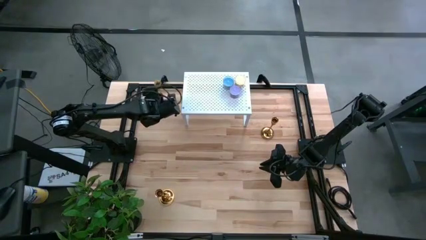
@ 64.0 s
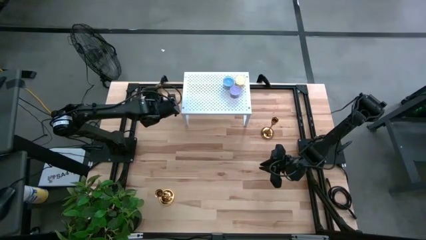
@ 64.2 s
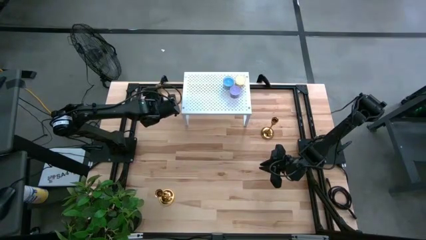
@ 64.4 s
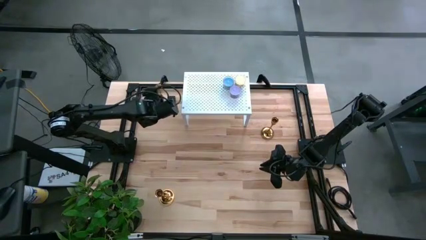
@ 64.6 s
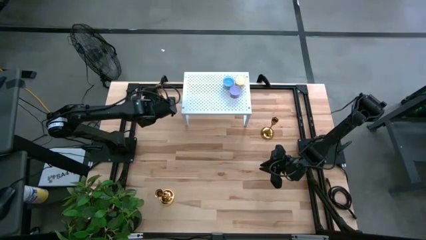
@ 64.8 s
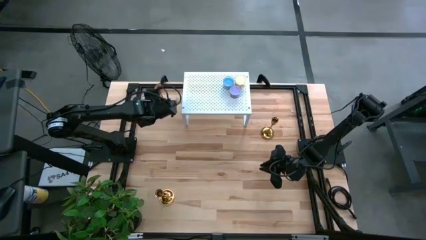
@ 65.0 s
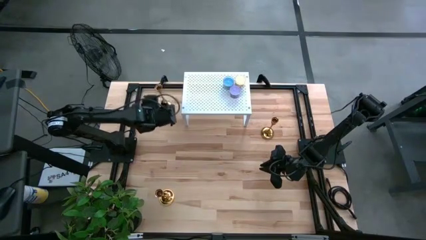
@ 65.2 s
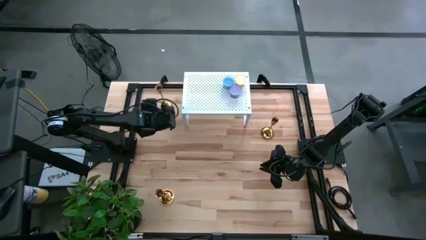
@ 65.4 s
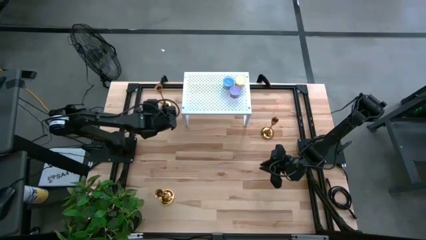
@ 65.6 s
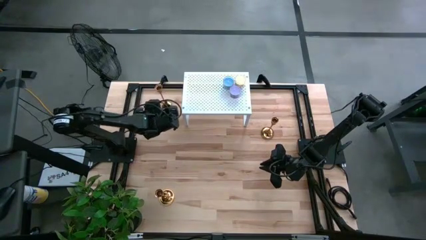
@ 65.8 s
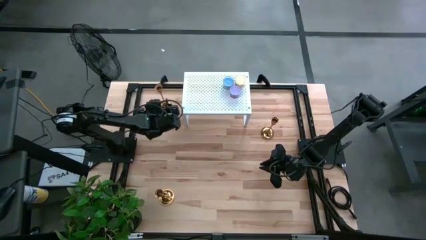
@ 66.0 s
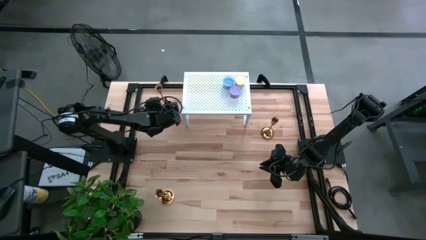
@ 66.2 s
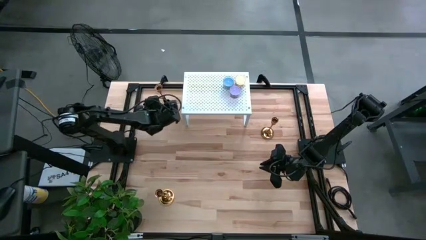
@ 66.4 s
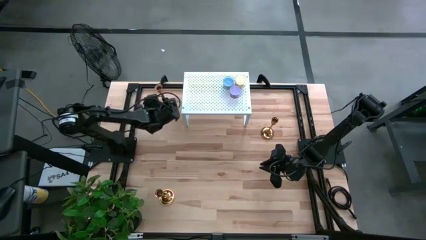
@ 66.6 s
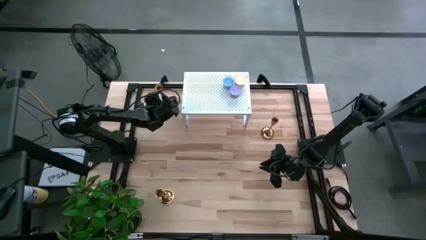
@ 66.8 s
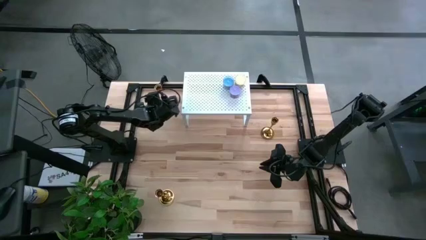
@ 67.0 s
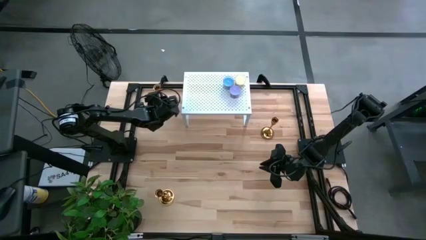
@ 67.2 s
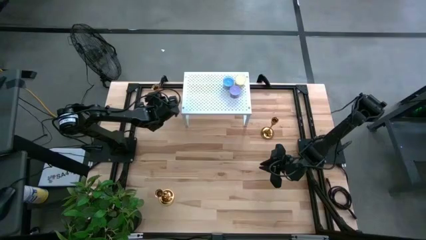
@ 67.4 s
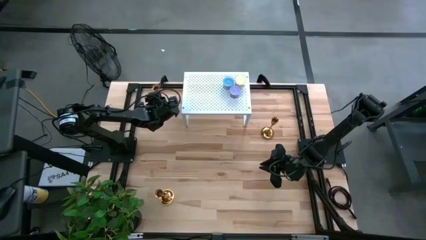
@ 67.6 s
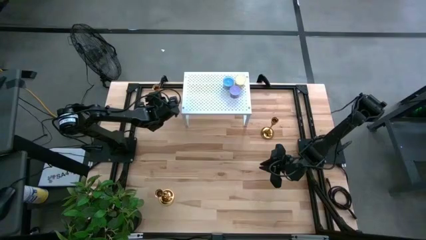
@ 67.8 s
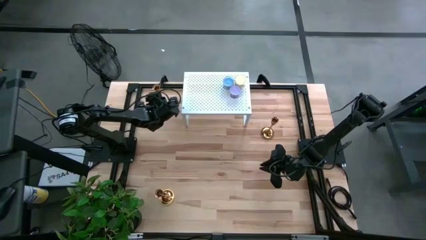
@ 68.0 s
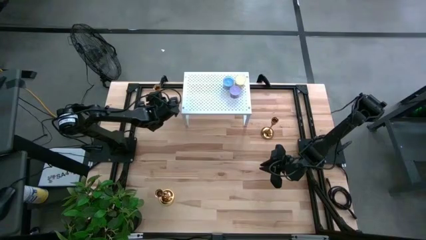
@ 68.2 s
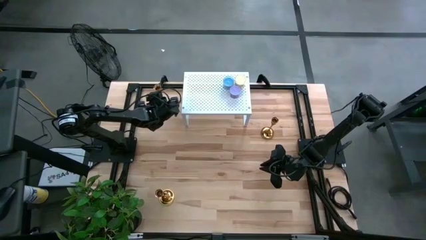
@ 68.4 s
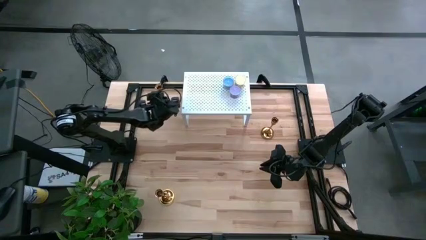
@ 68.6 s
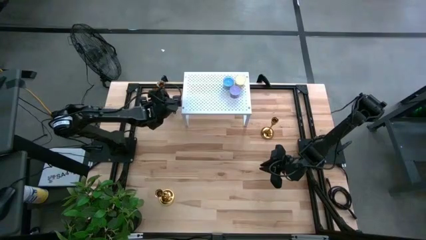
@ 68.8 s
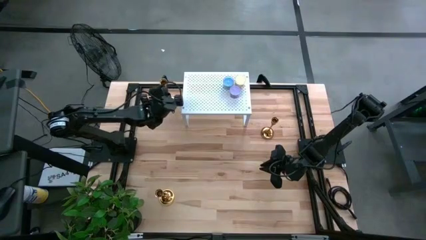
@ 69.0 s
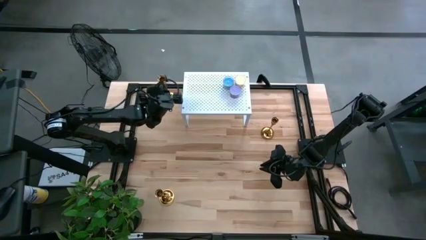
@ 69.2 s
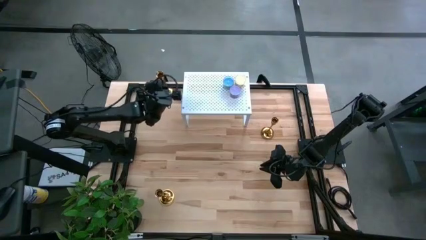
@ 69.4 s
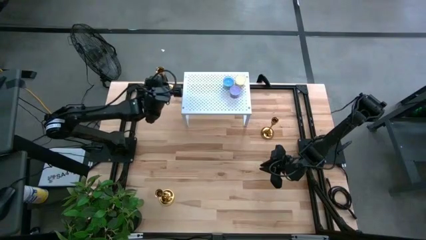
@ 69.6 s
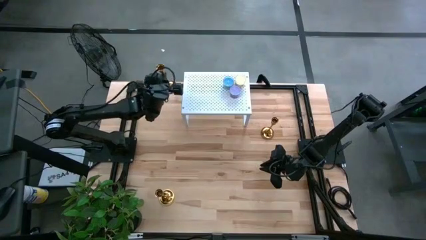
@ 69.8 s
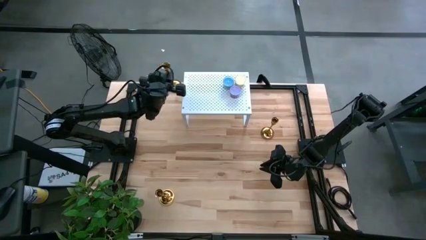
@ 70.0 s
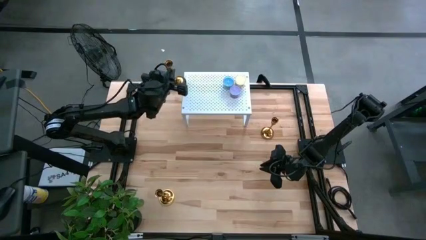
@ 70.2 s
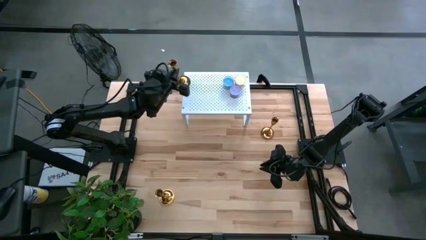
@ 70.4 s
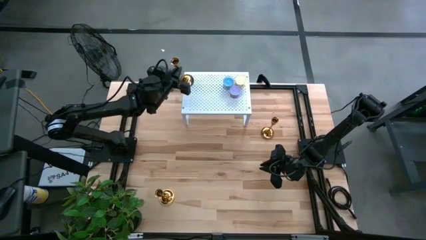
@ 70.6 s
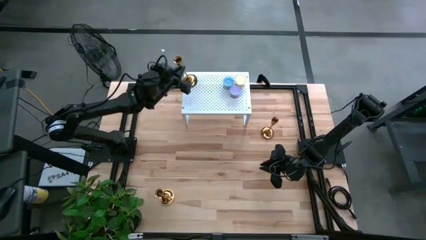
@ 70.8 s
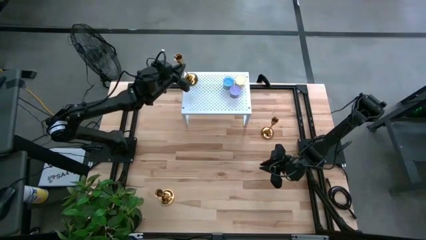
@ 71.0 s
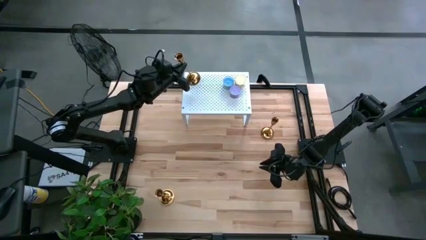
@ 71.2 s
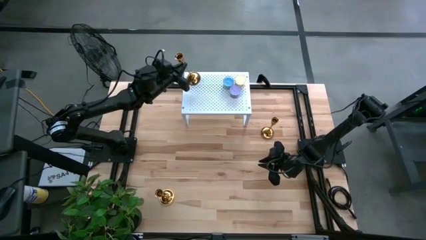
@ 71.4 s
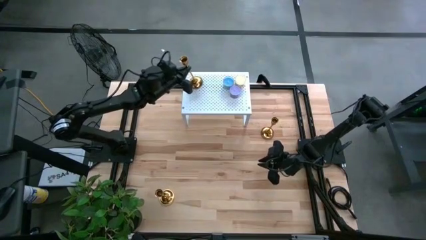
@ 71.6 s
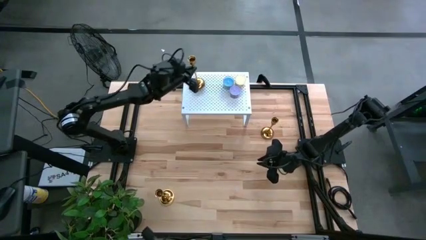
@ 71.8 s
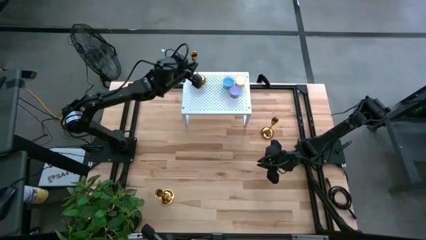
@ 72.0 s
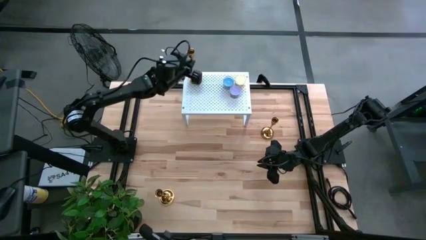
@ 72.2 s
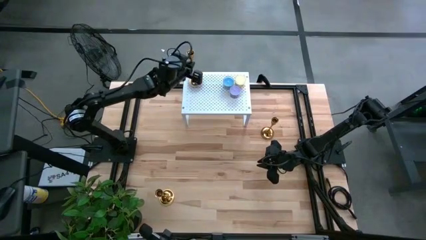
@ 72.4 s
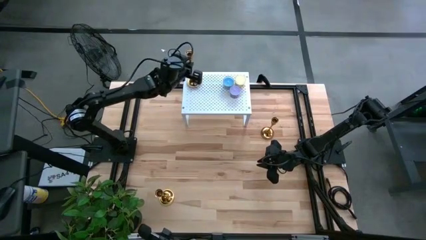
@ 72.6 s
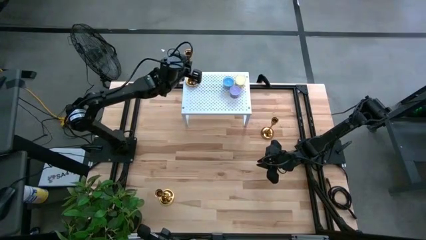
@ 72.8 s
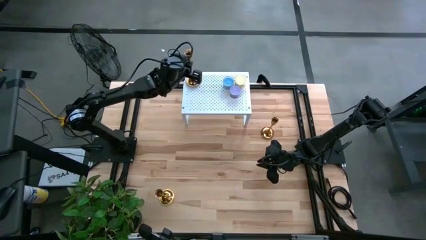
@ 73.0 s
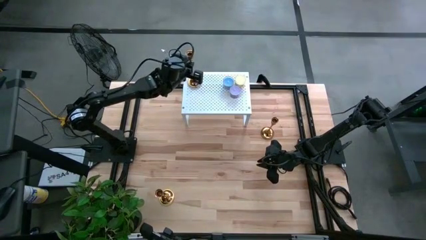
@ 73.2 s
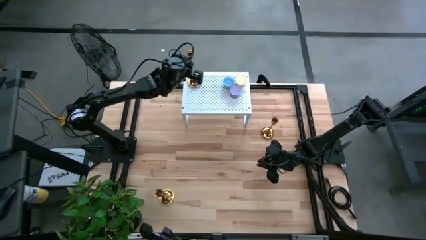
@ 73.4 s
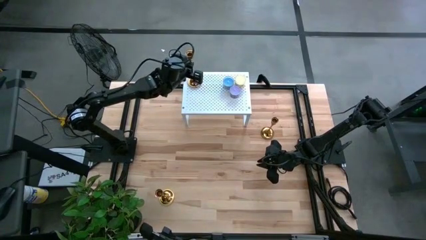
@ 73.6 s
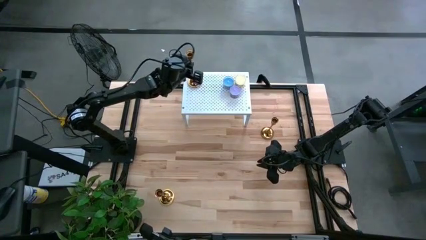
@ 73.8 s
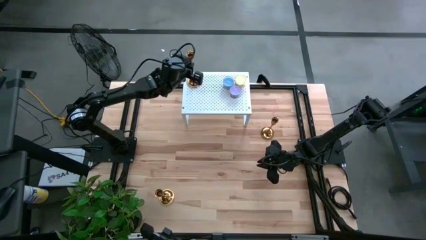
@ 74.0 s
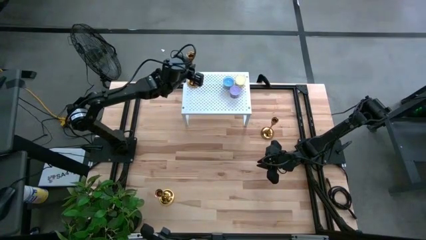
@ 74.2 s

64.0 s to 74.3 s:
Task: Pick & Place candle stick holders
Put the top left candle holder on the shelf

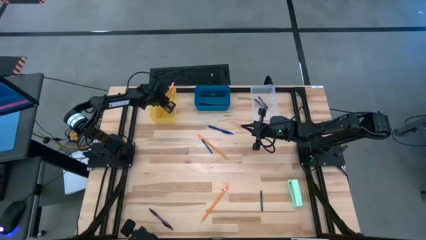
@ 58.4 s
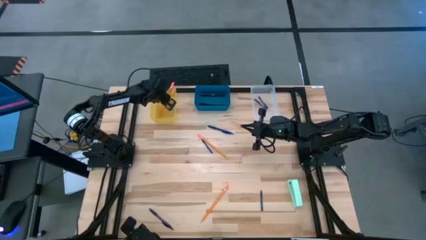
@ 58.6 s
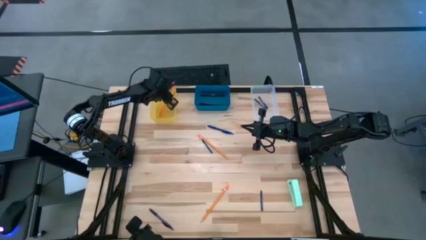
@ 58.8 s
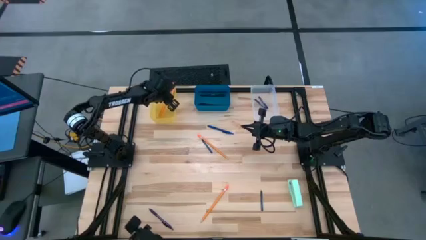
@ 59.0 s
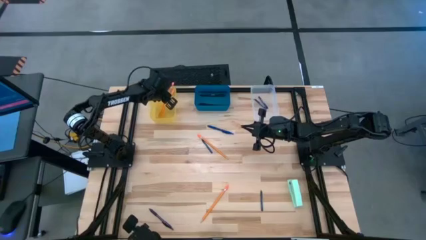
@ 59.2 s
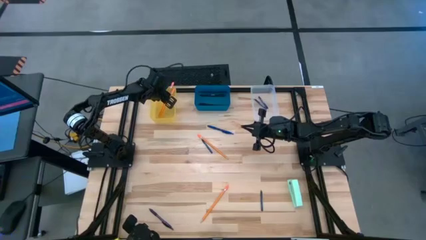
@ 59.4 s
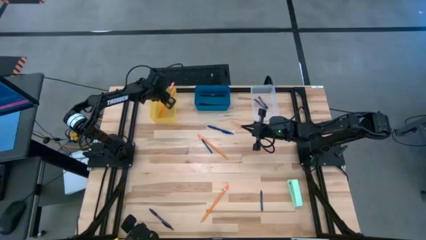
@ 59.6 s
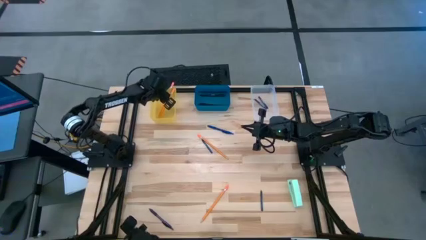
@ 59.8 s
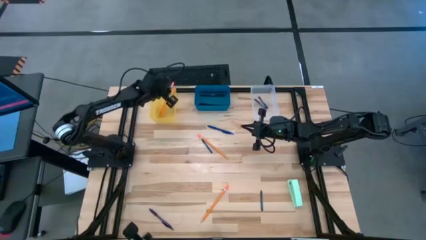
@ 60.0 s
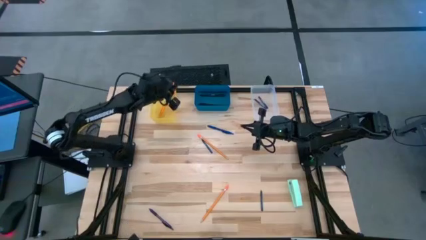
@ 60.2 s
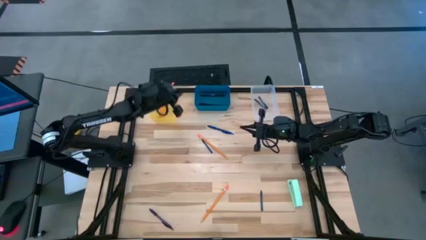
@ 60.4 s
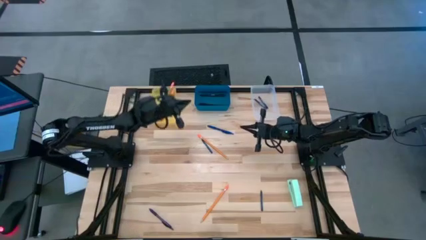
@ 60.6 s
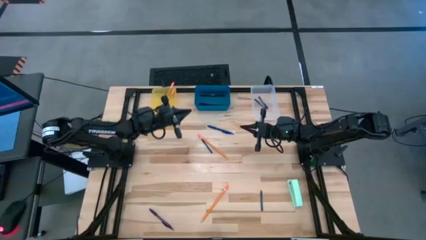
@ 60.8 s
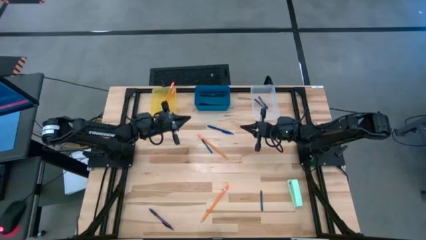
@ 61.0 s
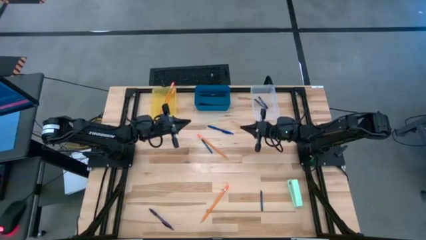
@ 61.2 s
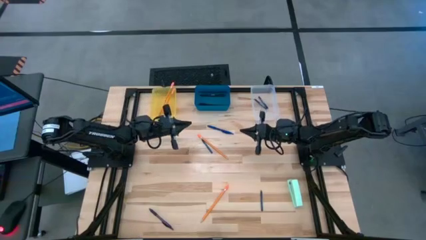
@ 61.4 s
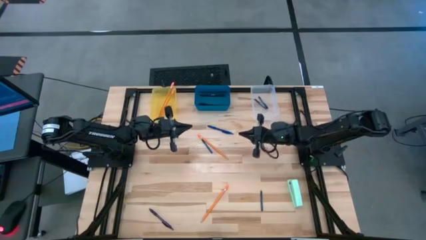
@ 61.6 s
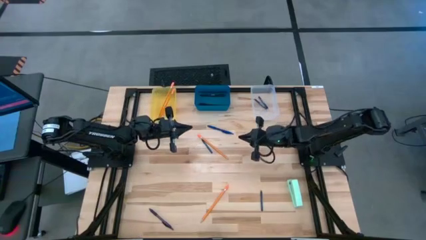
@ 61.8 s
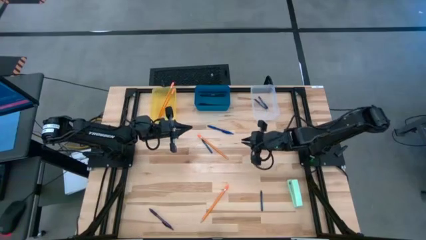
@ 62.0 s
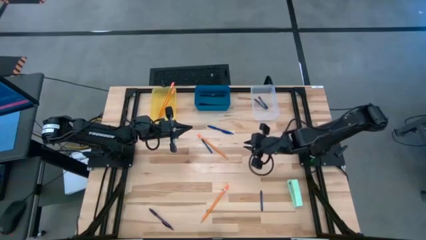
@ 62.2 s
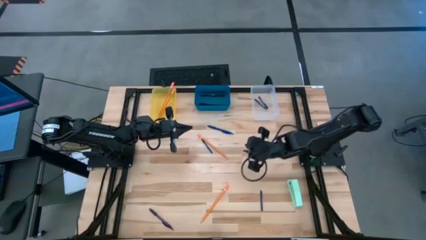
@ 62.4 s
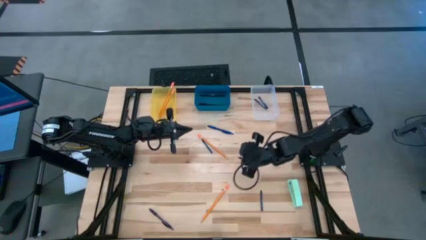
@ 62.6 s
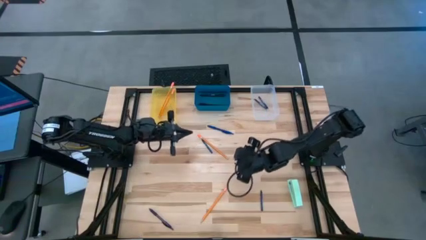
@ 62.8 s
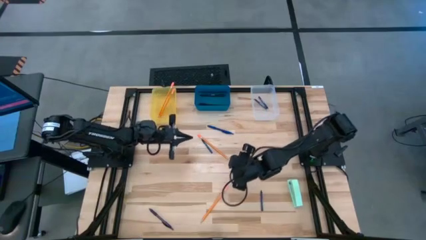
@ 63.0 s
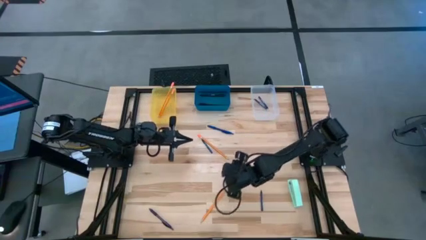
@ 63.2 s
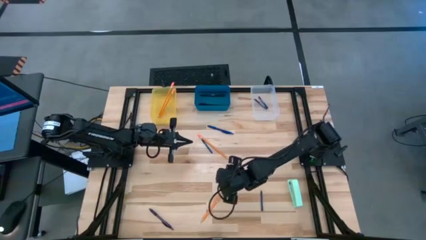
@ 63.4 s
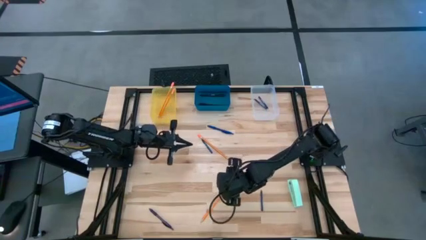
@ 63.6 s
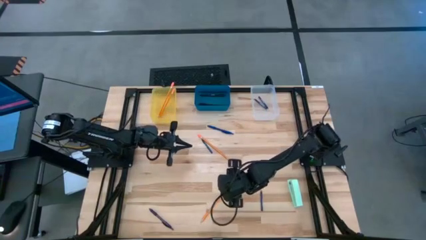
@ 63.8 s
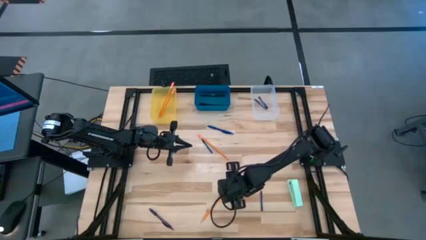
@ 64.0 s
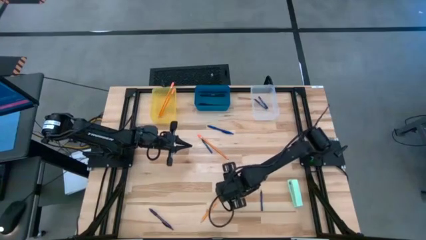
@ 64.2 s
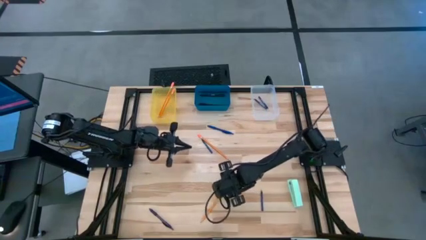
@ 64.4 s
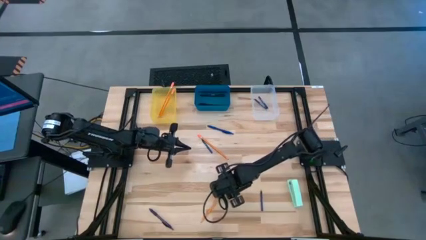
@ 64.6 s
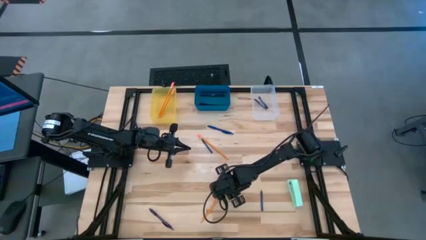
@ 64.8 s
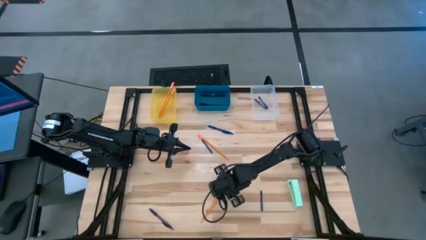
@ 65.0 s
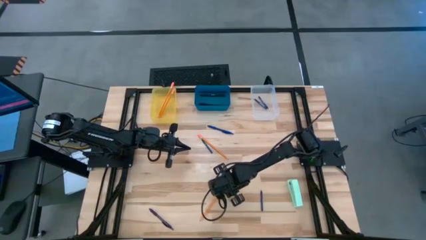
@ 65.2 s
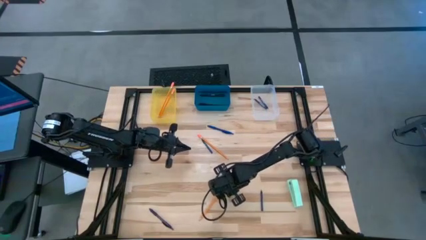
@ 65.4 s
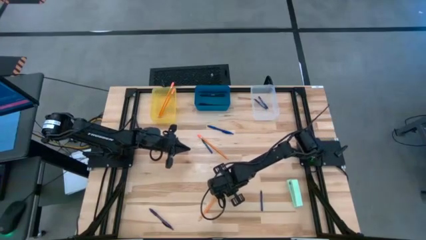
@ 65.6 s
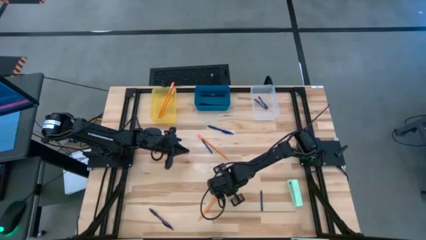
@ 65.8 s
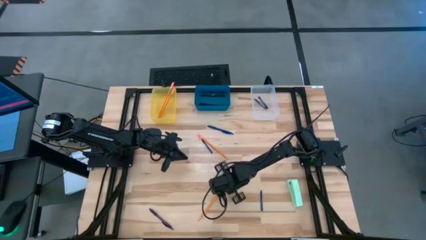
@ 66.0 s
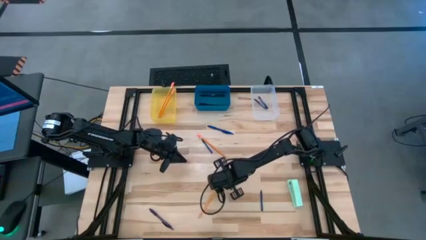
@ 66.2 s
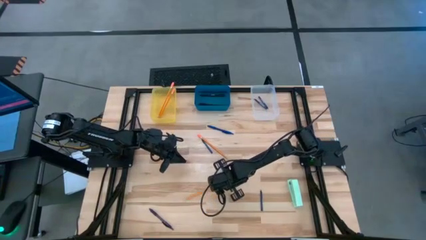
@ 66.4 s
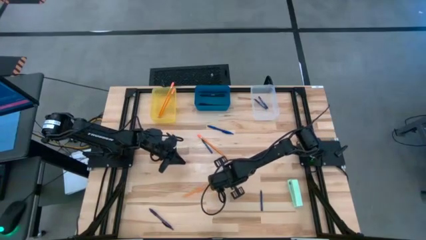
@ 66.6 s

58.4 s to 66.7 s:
Task: Sort crayons/erasers/pens/pencils in bins
Put the orange pencil into the transparent yellow bin
